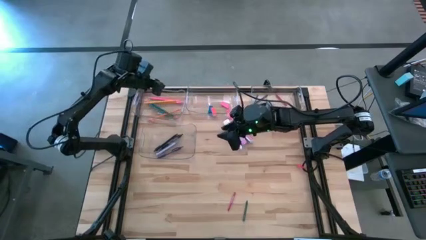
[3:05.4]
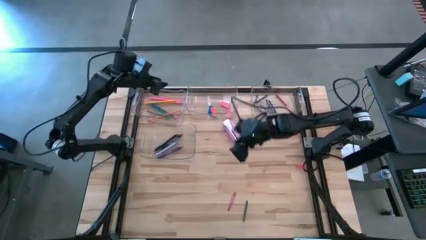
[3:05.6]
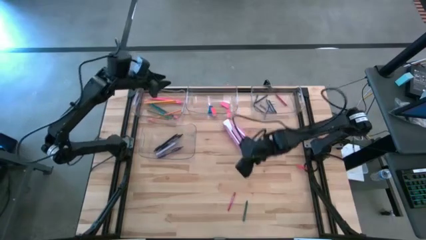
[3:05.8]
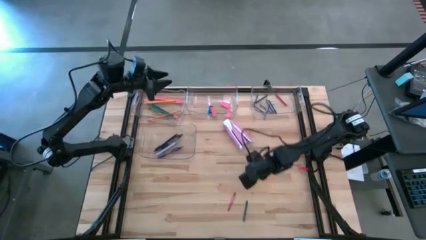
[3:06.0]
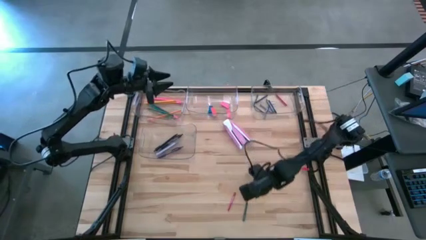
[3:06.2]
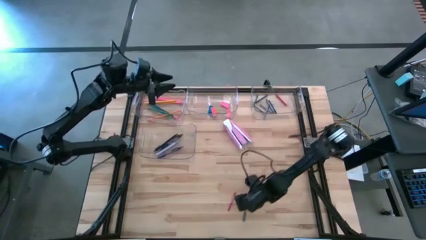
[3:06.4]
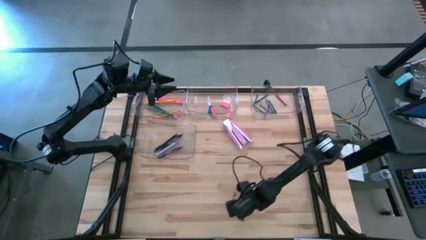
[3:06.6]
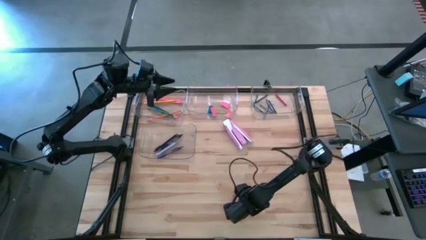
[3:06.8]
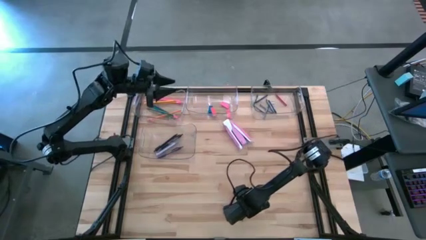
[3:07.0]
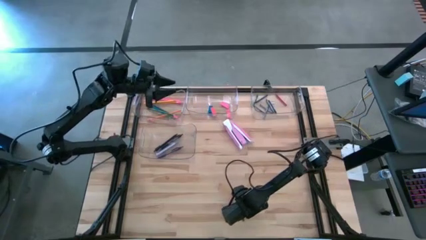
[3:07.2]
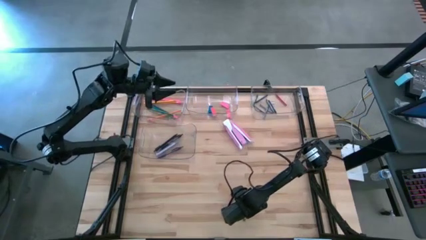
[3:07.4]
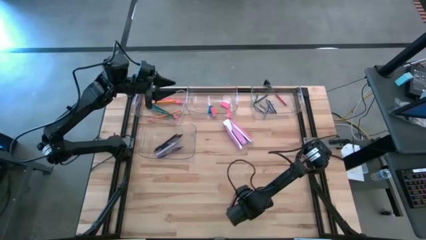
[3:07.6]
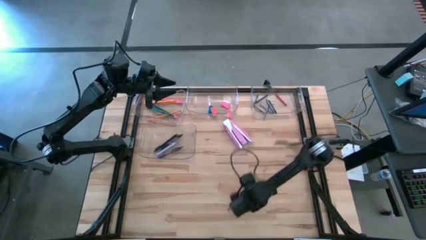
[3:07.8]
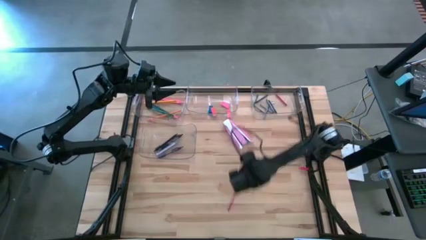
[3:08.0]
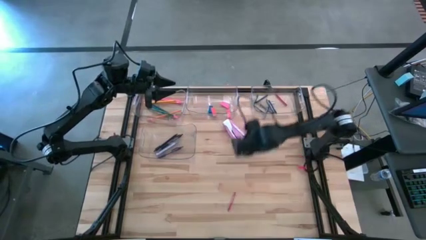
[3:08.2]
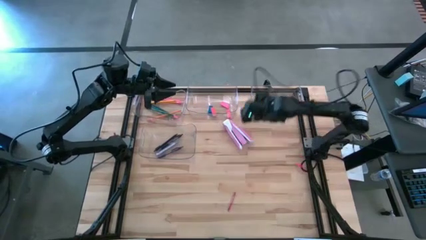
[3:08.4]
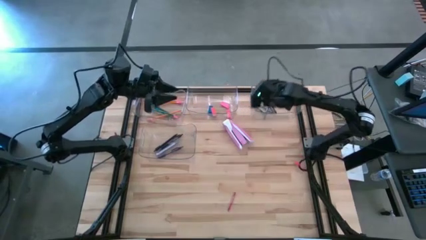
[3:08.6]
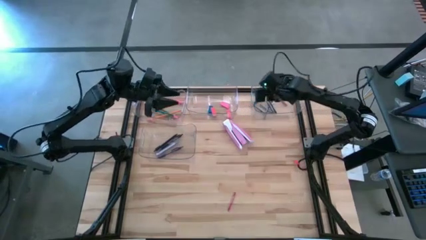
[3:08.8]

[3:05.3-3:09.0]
Task: Sort crayons/erasers/pens/pencils in bins
Put the green crayon into the top right transparent bin

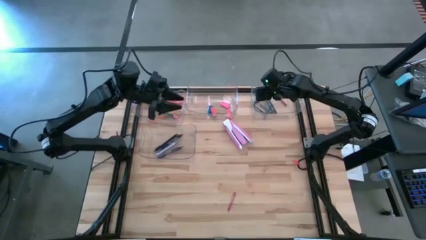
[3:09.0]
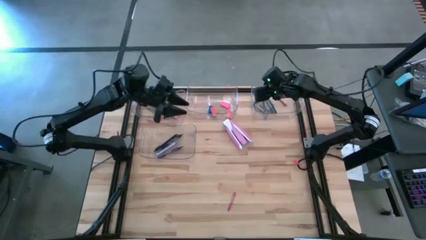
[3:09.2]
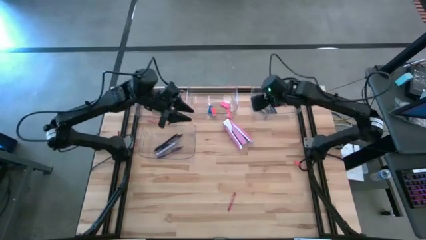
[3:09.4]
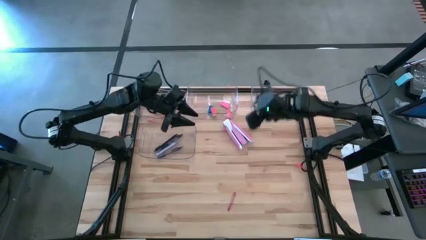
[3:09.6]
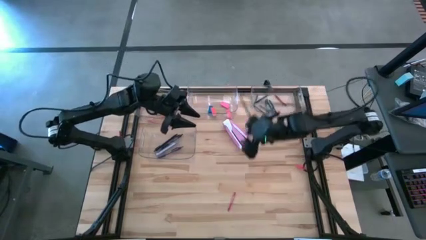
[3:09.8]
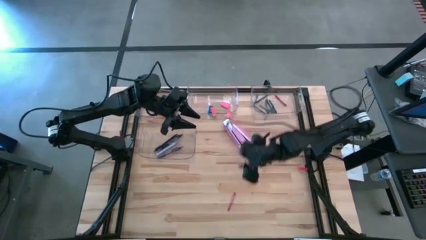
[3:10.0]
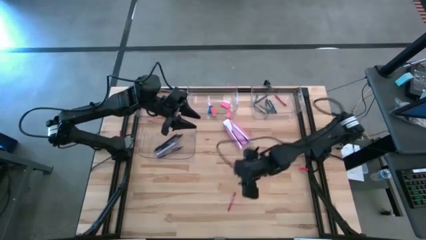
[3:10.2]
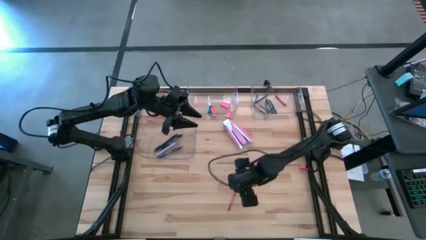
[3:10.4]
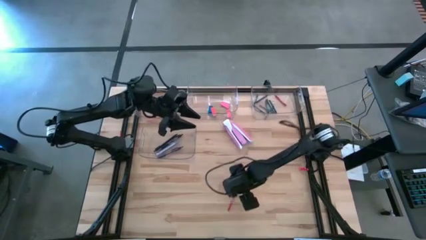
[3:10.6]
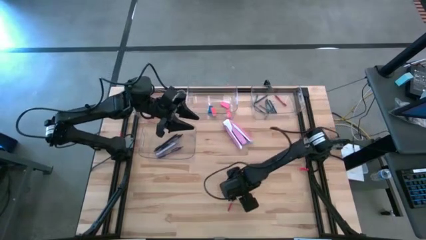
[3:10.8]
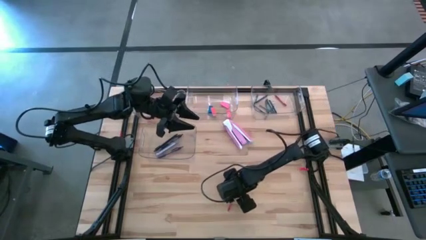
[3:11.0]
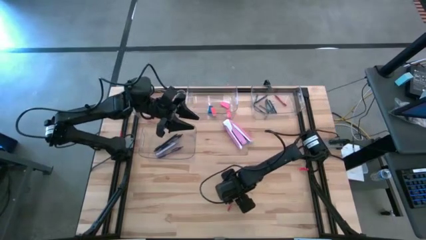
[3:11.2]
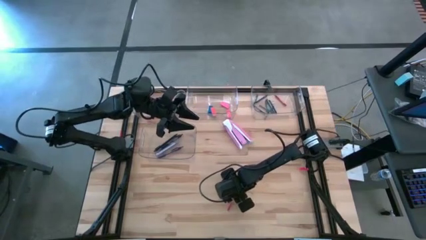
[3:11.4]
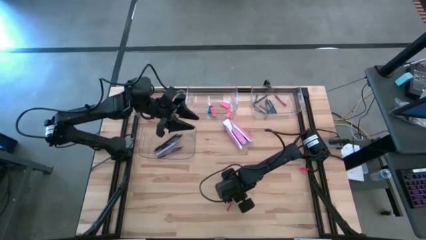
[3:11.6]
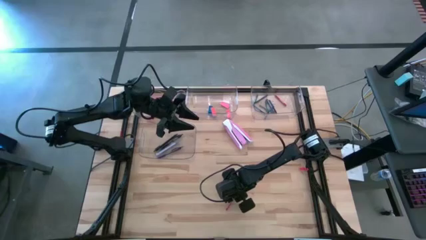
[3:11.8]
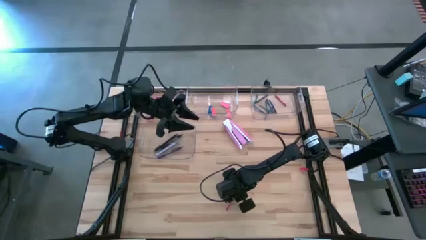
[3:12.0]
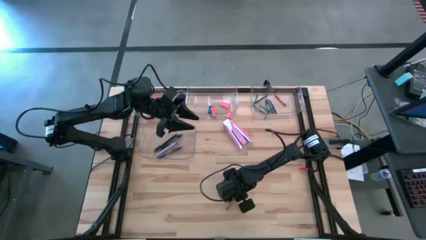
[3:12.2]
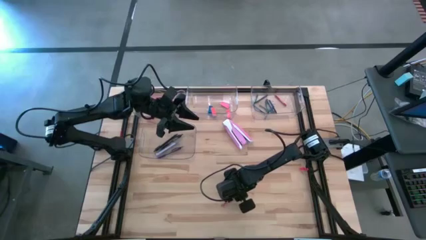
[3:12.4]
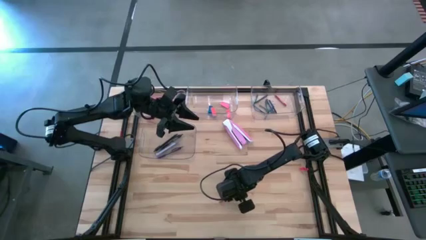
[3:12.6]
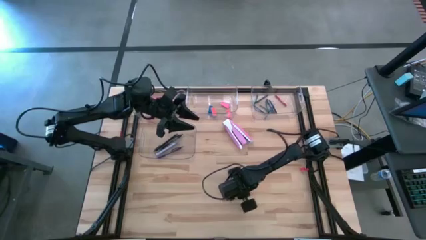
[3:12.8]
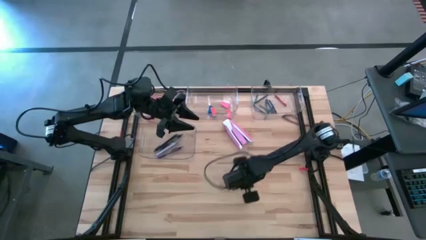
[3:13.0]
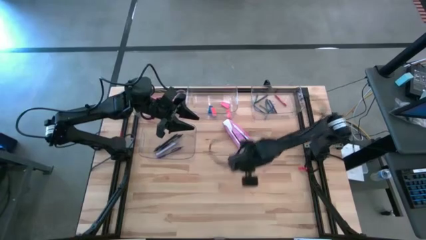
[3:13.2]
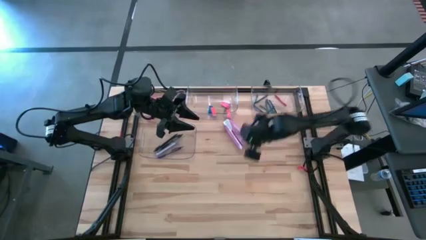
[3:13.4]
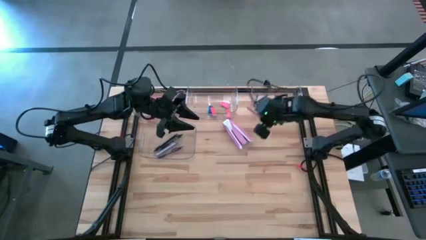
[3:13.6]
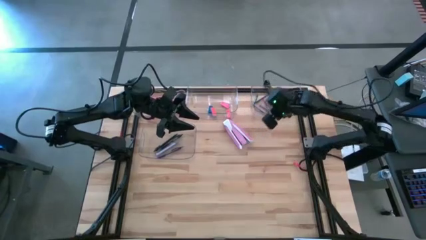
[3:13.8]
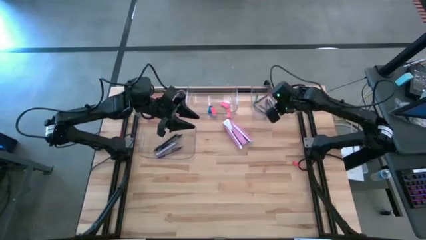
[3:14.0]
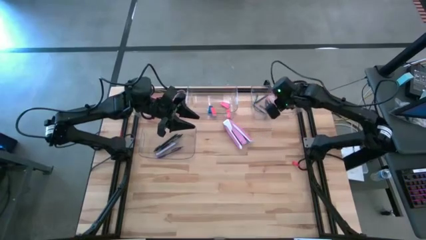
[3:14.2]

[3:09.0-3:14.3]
Put the red crayon into the top right transparent bin

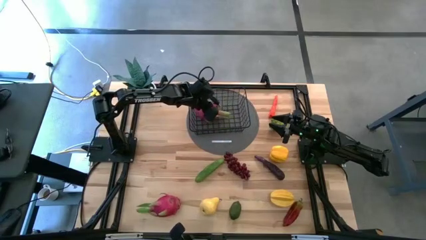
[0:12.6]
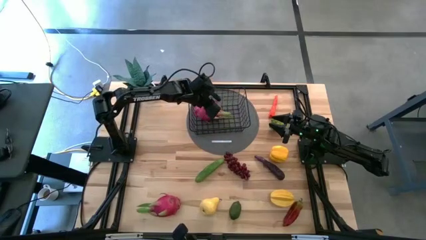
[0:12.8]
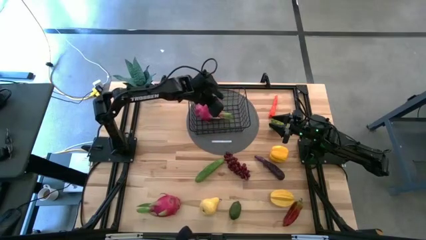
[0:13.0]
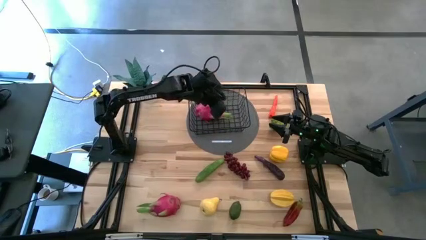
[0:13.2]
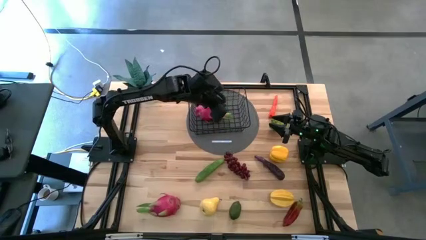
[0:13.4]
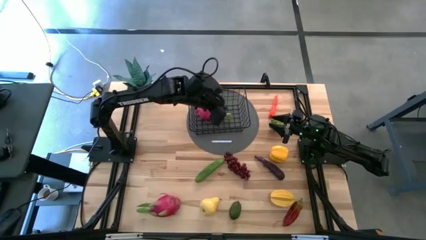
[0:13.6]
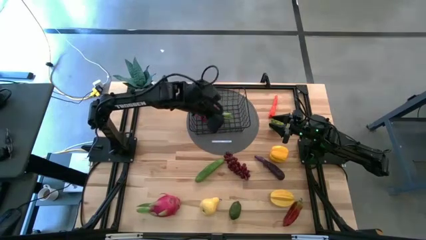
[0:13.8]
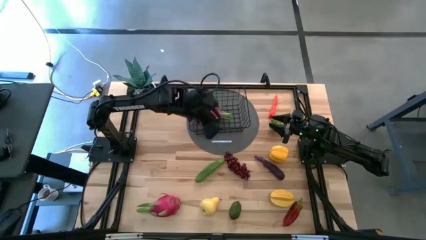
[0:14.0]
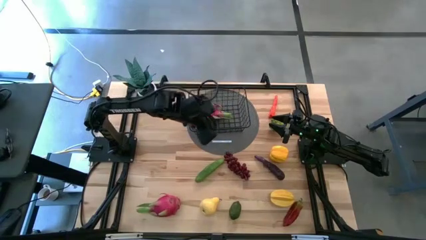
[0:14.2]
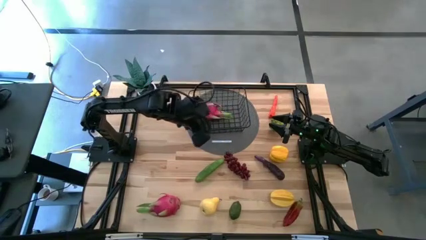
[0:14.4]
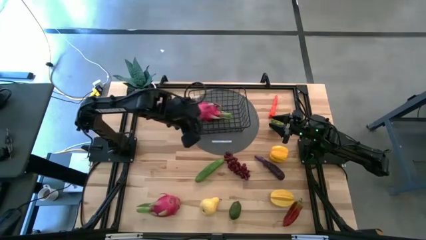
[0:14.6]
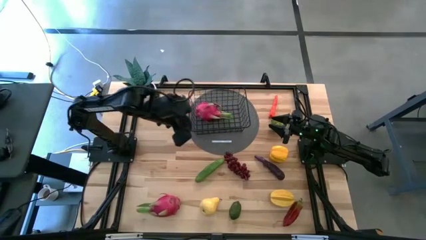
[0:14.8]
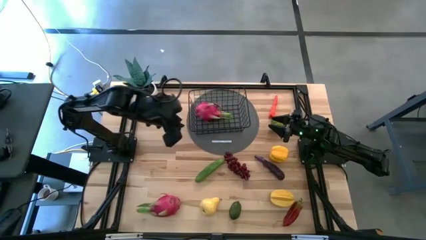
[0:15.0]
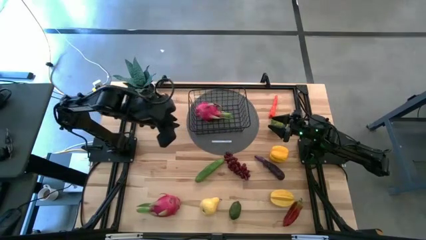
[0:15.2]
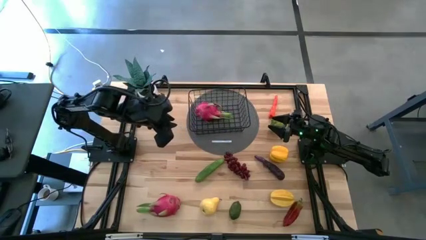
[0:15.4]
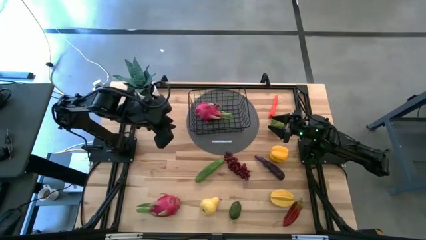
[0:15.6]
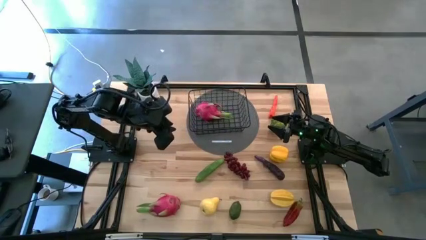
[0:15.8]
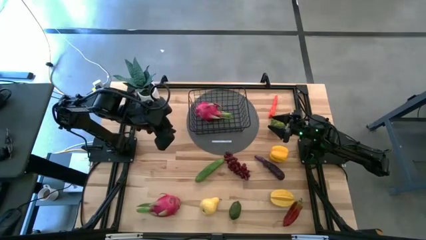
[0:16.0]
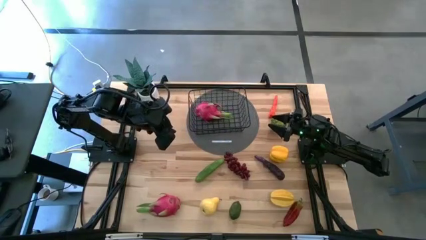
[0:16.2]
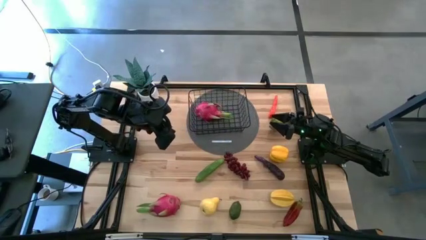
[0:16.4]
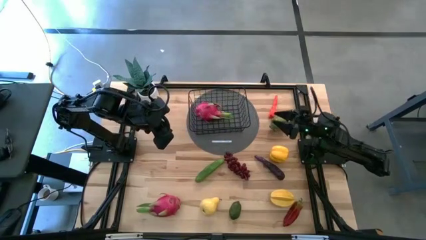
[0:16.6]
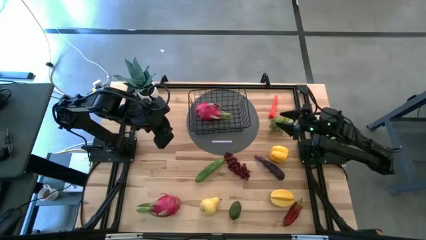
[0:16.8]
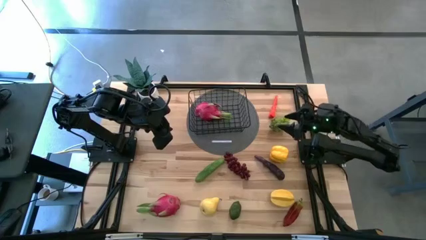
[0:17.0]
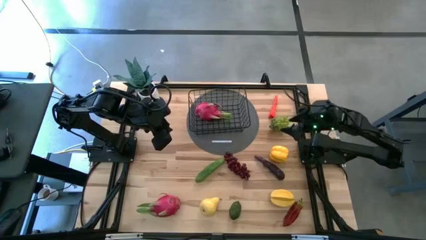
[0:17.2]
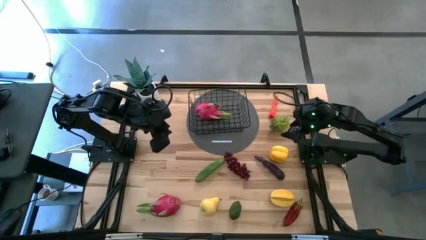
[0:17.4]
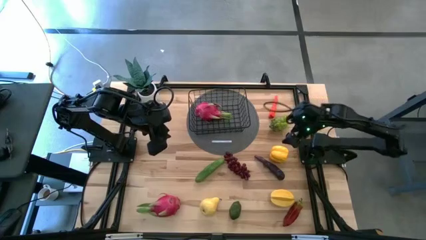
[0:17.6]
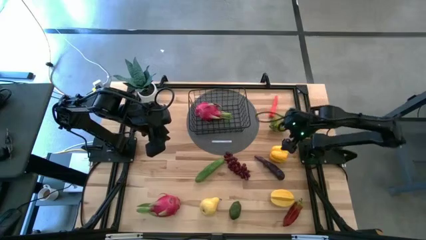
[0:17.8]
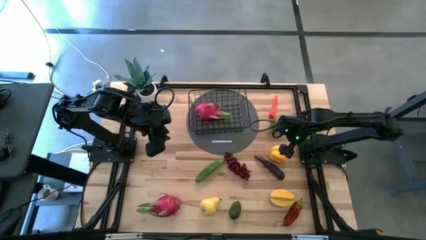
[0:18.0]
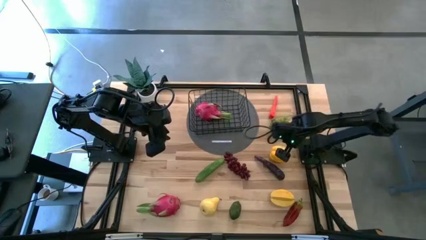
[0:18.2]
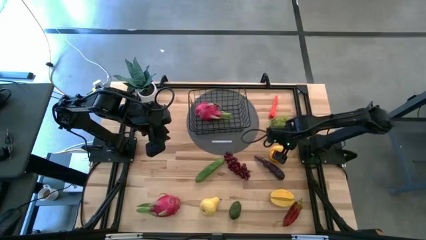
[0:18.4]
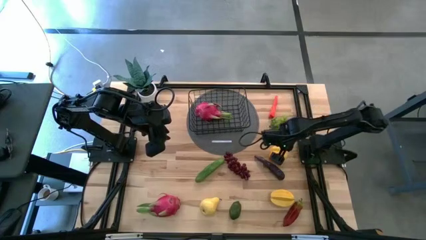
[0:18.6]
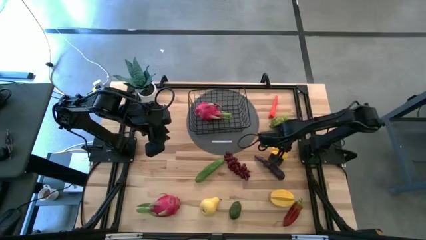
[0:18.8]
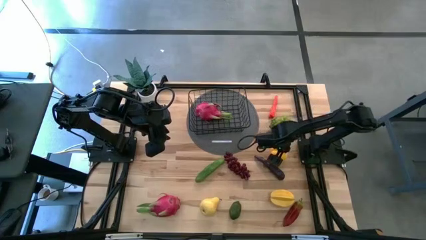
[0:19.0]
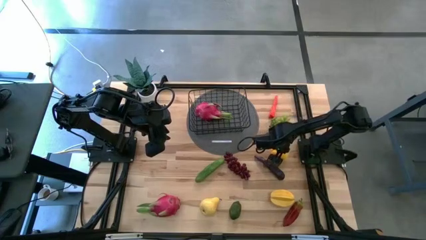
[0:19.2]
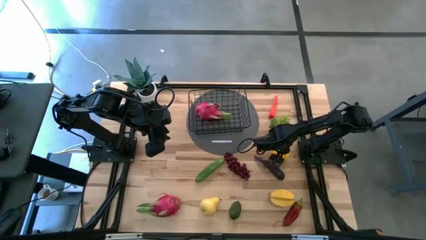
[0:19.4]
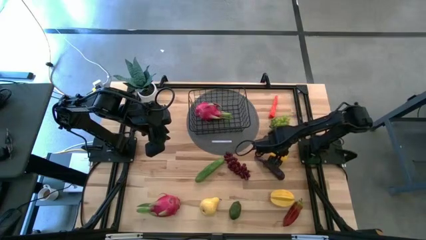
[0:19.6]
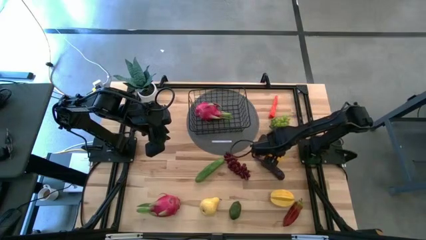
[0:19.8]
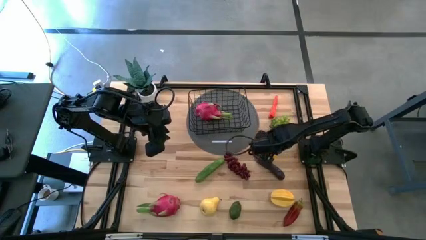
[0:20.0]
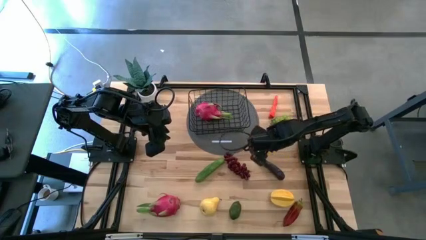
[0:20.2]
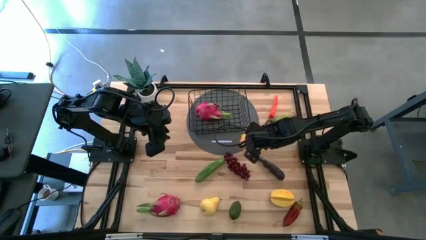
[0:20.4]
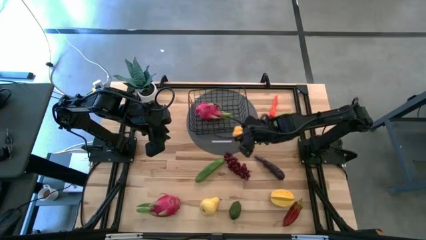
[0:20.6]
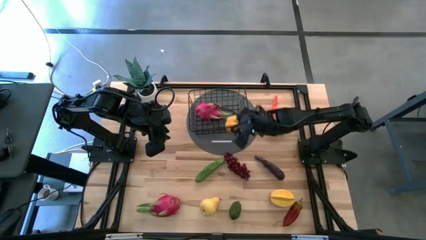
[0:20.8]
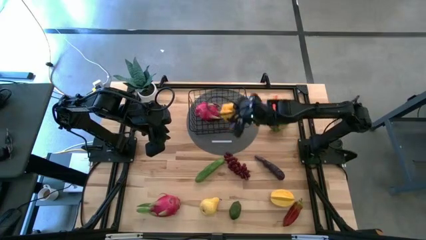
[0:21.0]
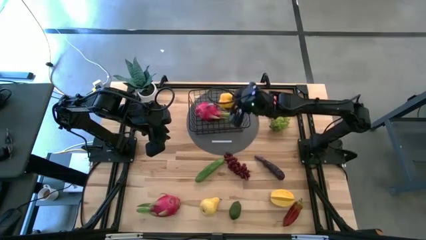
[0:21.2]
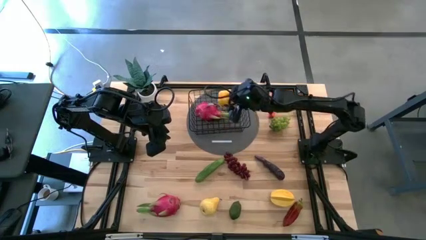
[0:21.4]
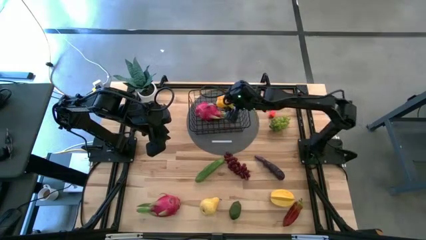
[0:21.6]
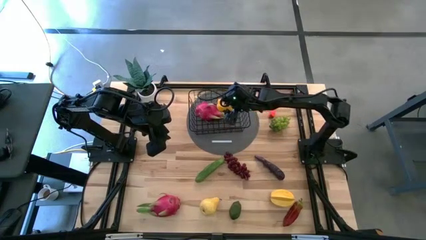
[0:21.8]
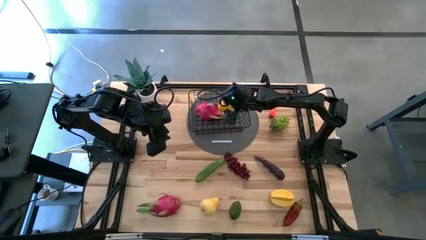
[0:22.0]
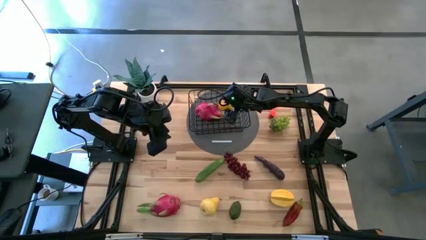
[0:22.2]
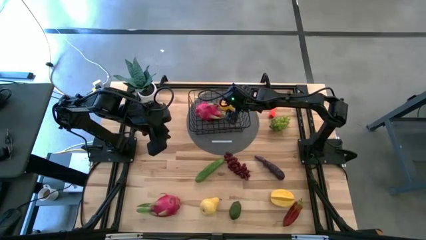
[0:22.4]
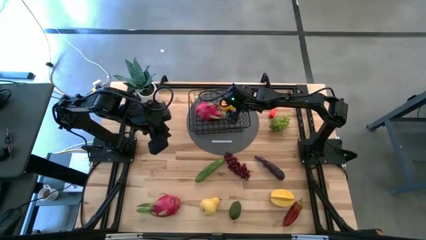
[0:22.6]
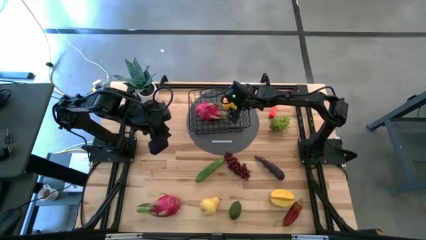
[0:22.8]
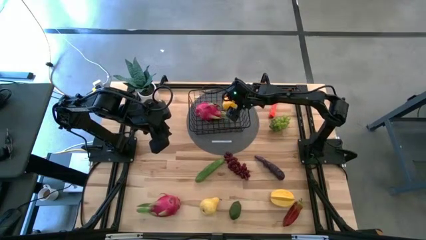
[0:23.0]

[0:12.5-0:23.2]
Task: Build produce basket
Put the yellow bell pepper into the wire basket
